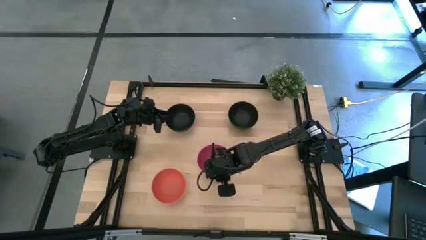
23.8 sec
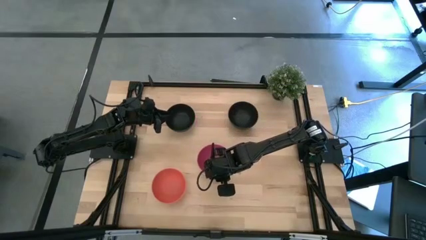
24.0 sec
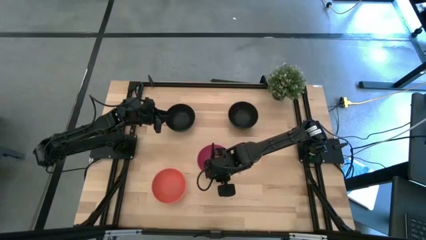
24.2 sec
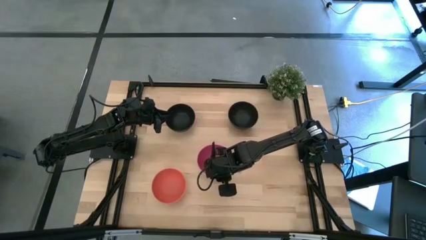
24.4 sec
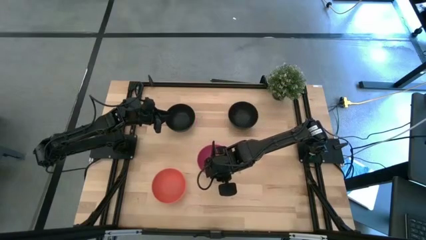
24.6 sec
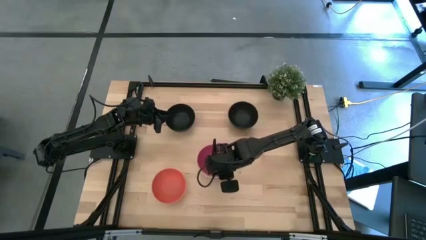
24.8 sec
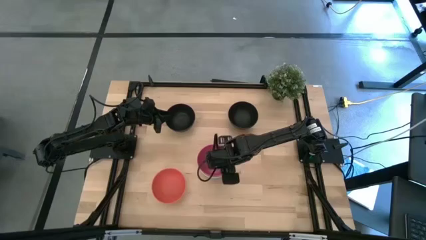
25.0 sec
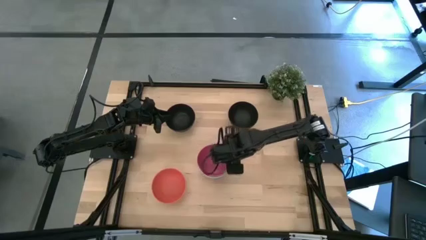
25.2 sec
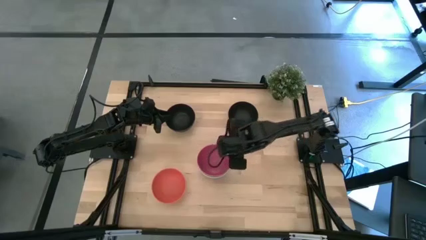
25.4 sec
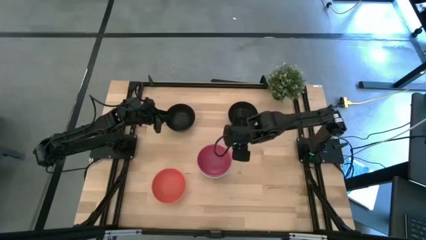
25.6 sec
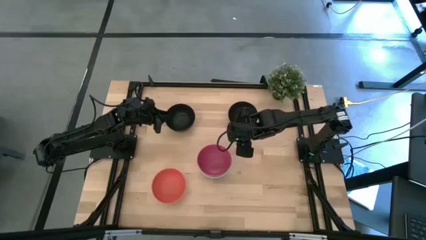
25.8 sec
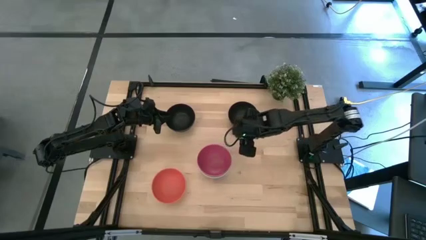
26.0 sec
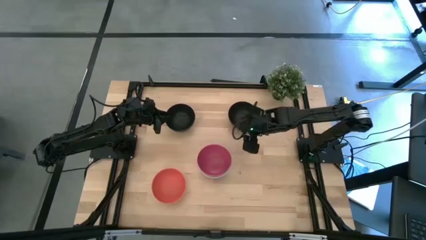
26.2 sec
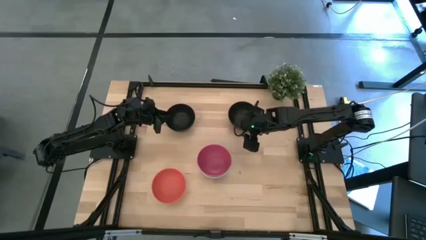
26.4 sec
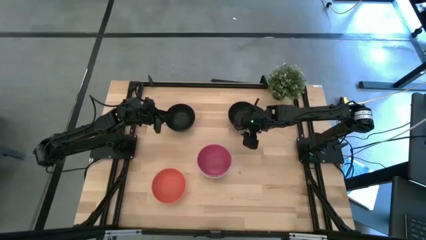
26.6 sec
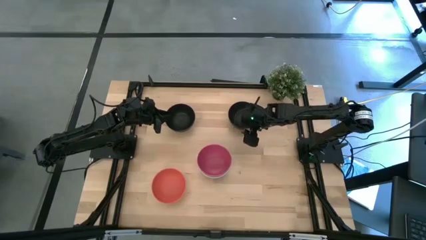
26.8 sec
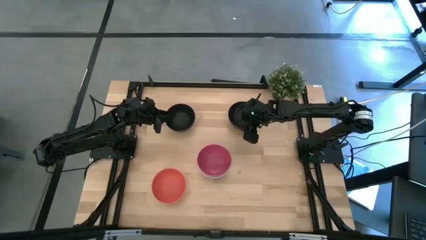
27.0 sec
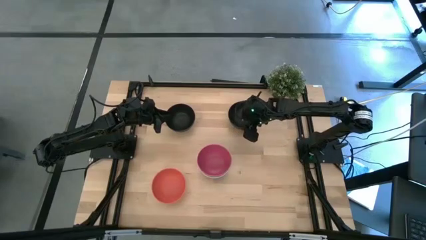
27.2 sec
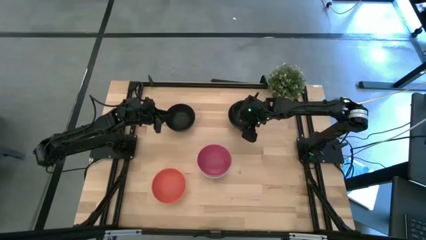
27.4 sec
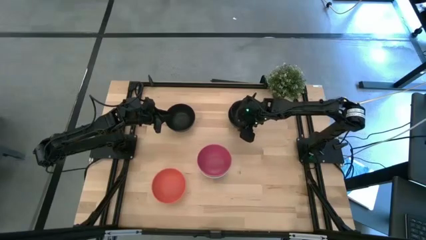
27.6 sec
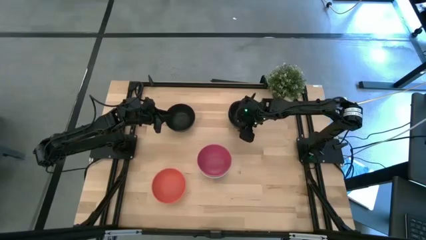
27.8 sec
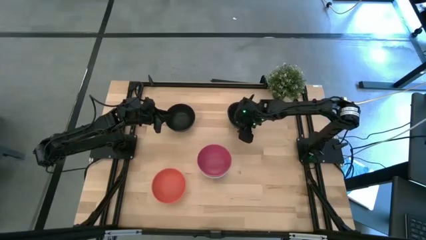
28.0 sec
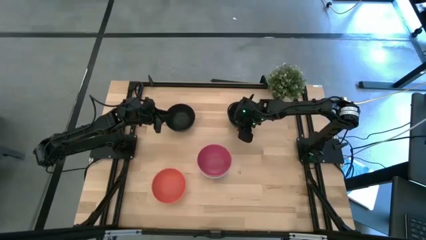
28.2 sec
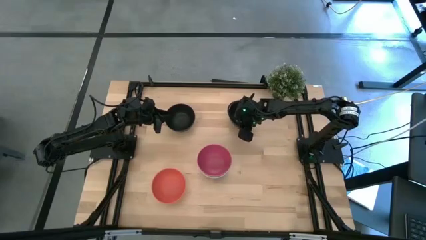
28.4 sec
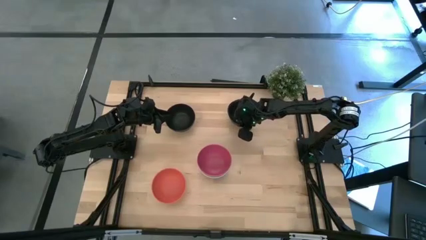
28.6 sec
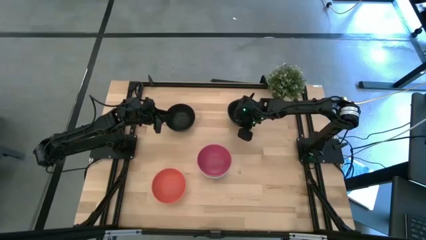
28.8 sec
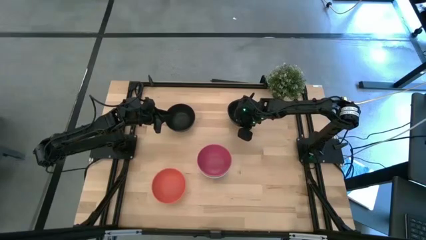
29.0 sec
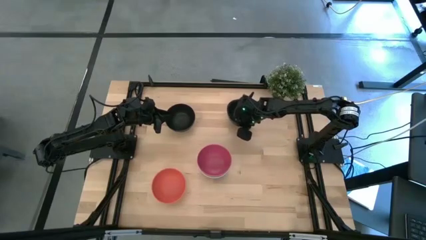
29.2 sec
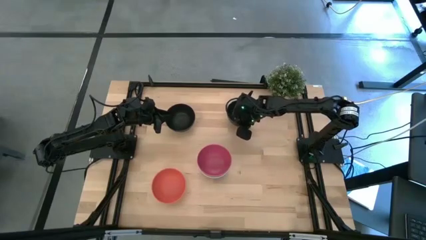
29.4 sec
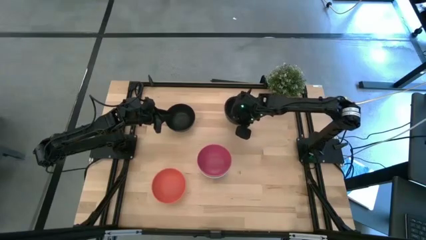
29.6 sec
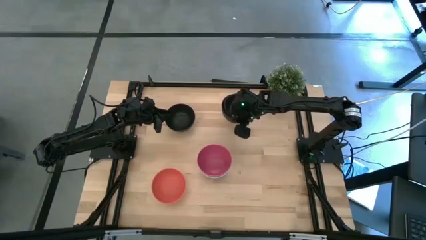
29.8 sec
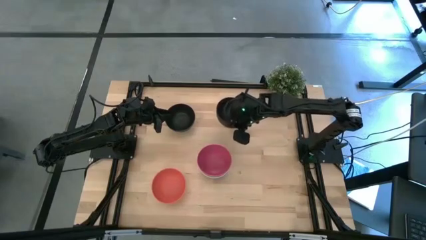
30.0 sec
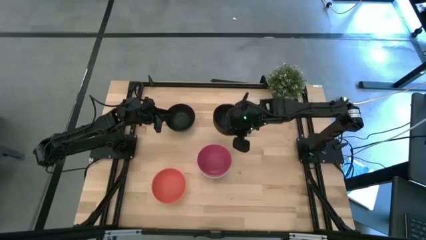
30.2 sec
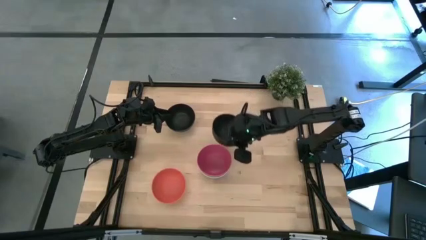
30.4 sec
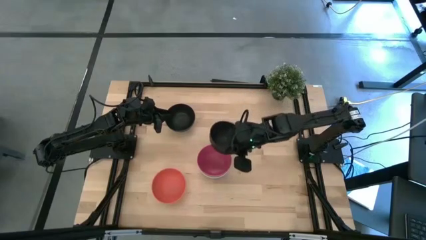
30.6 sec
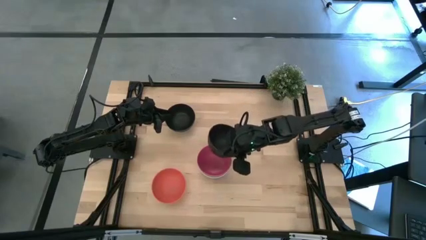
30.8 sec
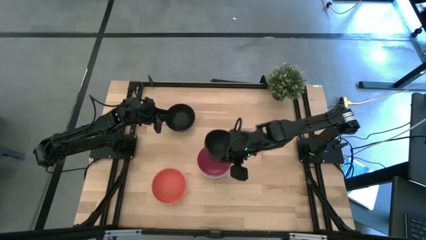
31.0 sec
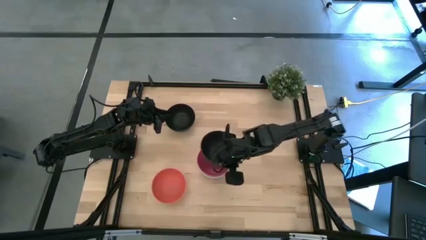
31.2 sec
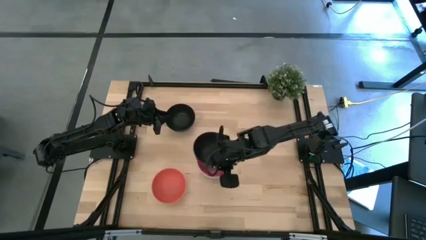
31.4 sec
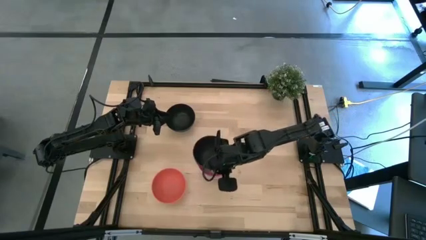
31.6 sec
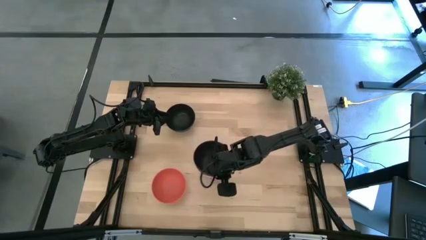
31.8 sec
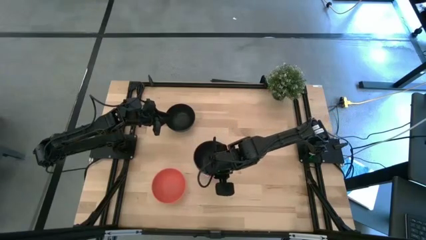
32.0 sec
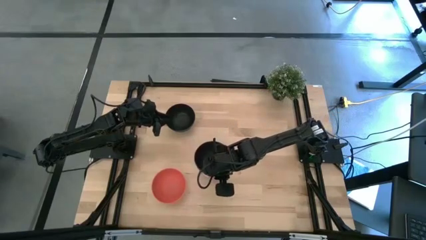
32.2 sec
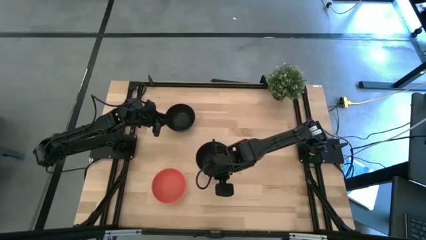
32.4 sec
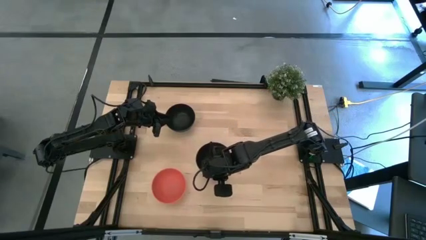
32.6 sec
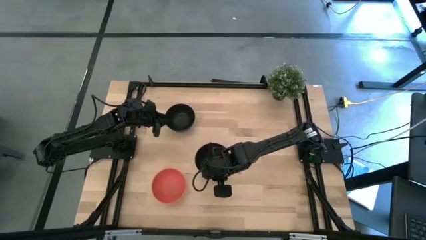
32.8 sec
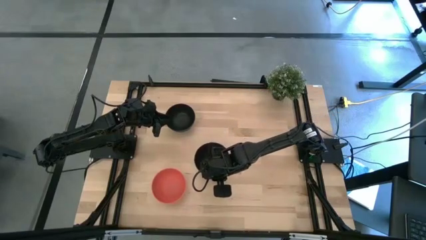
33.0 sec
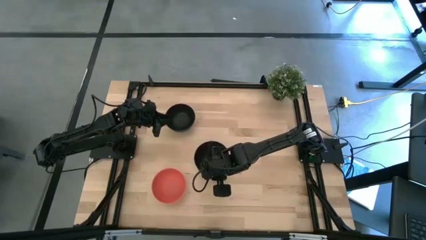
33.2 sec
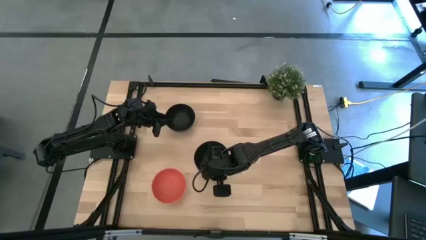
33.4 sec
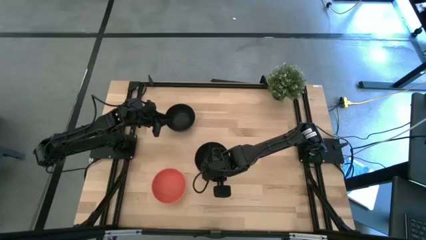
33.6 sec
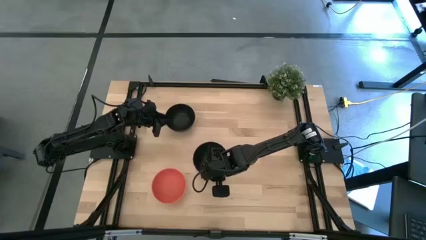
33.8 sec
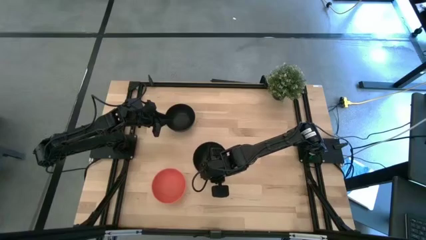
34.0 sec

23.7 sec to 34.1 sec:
Task: Nest bowls inside each other
Stack the right black bowl on top of the pink bowl

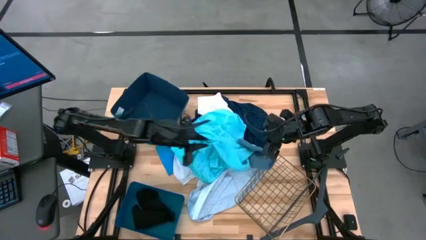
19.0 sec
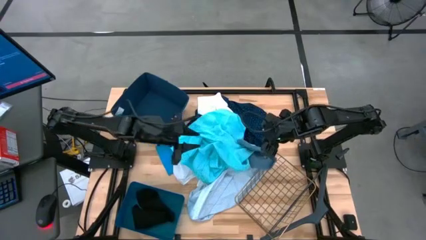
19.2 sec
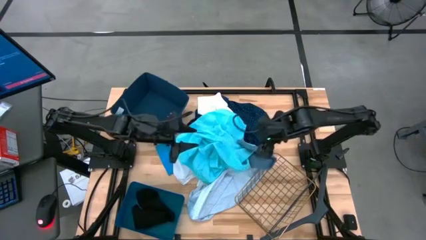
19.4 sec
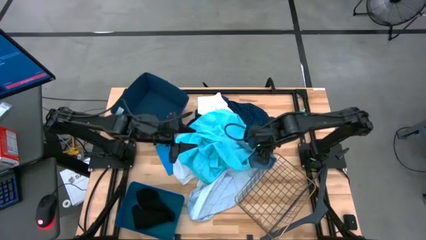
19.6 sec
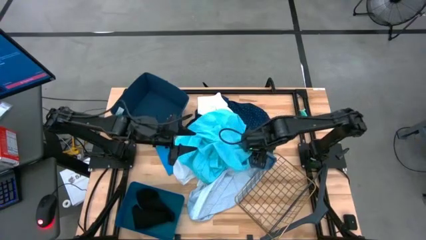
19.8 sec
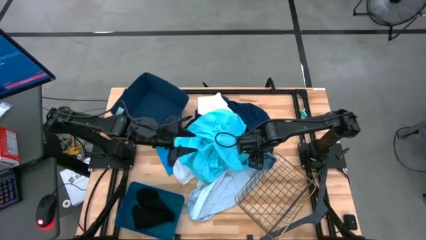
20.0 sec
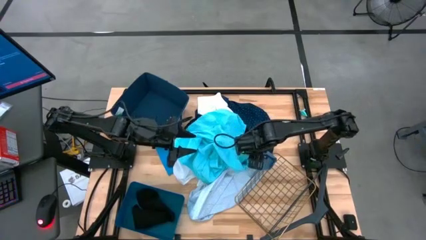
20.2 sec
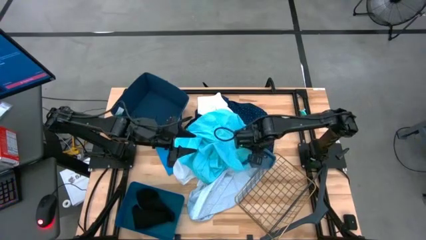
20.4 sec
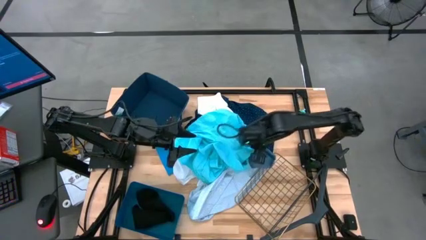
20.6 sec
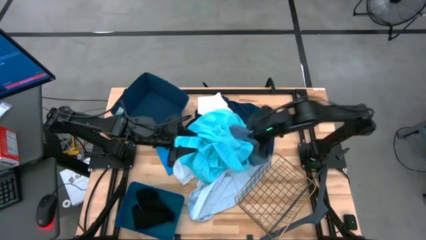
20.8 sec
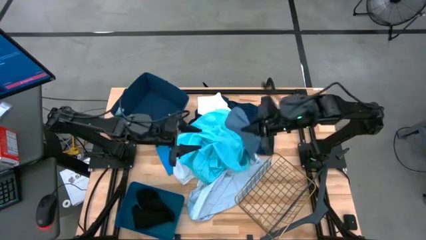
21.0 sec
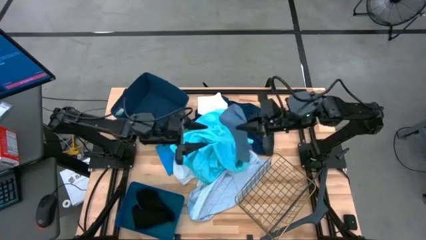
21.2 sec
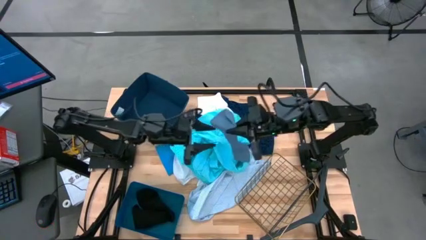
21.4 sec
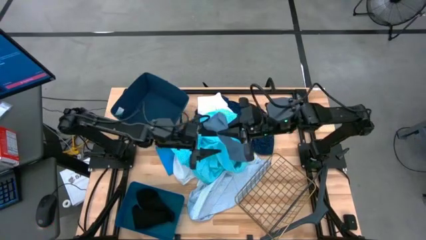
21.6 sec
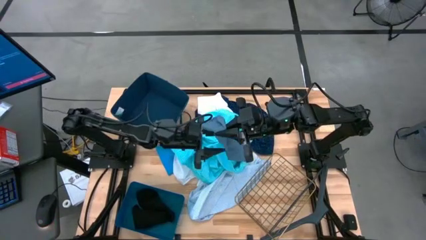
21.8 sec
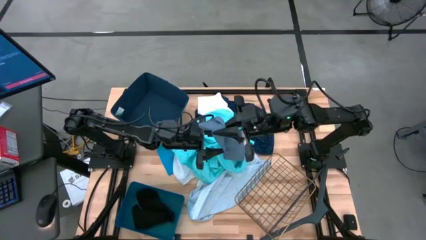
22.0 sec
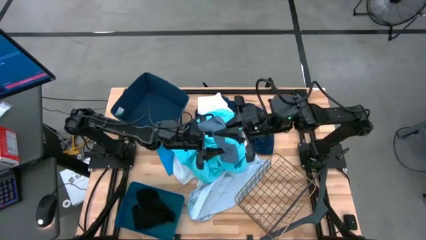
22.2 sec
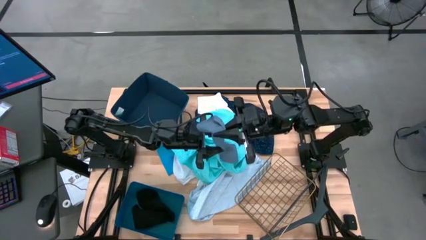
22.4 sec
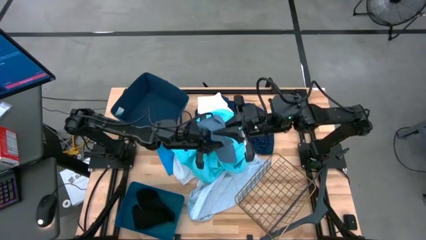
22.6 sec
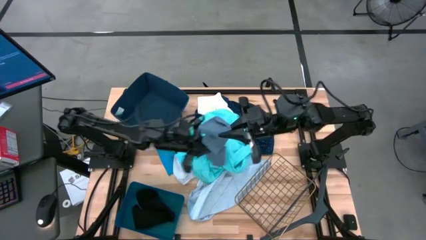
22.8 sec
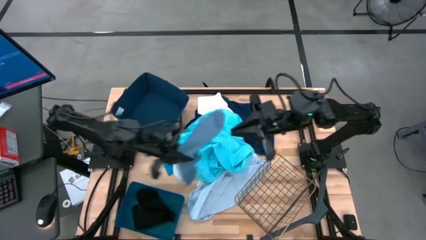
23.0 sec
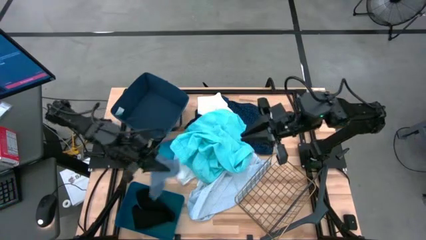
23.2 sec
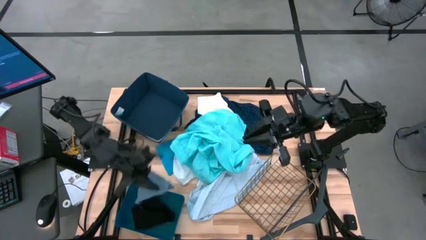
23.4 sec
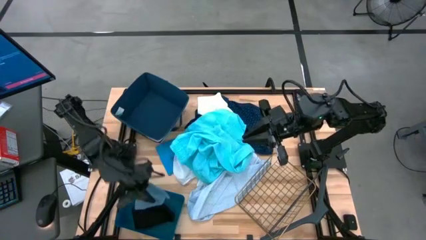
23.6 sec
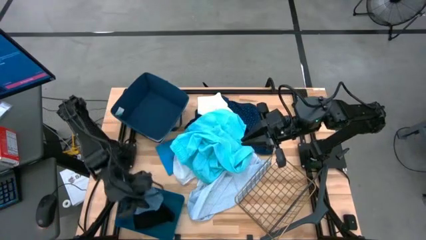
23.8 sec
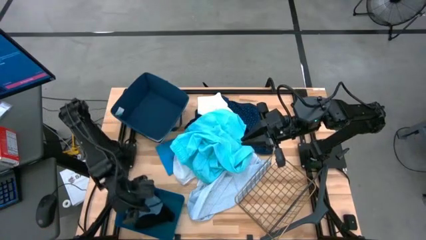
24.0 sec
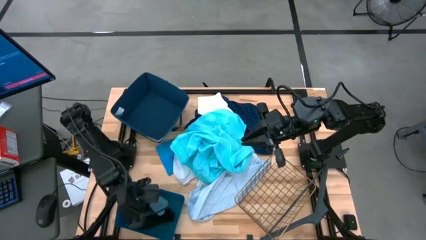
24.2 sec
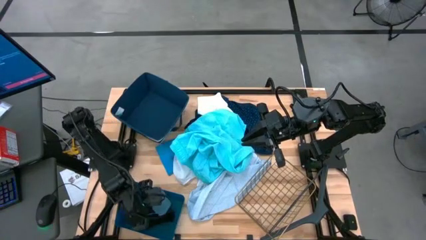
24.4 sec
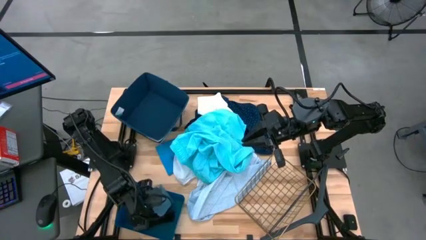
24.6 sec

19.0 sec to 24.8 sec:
Task: Pick & Place Cloths
Put the gray sock into the blue bin
